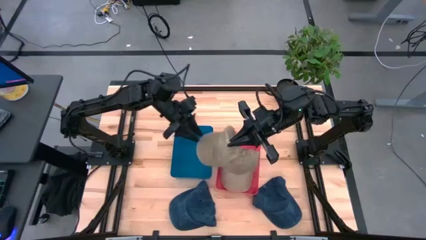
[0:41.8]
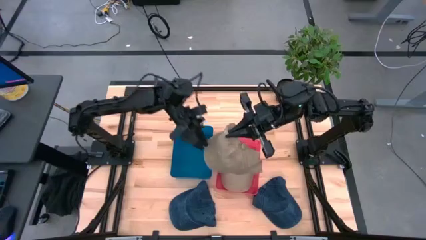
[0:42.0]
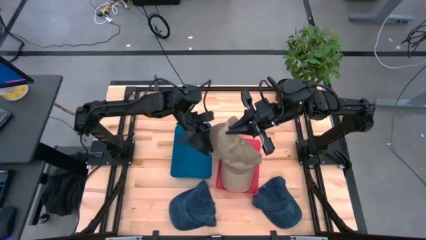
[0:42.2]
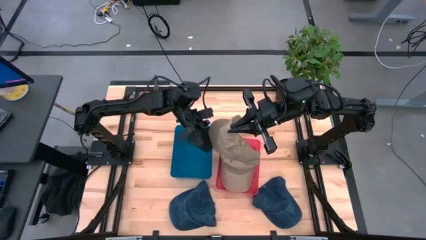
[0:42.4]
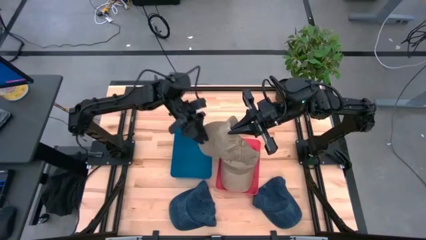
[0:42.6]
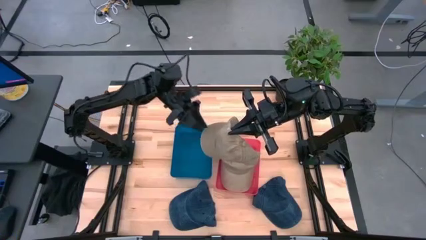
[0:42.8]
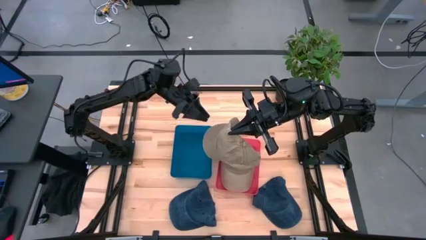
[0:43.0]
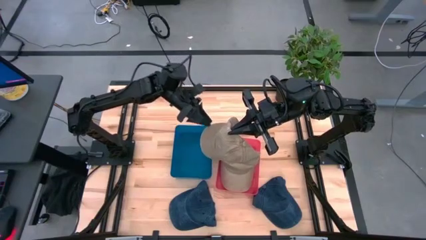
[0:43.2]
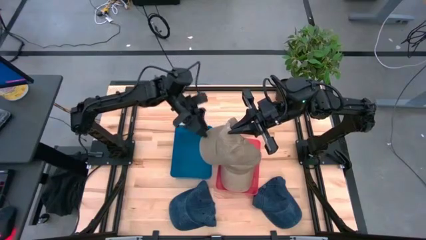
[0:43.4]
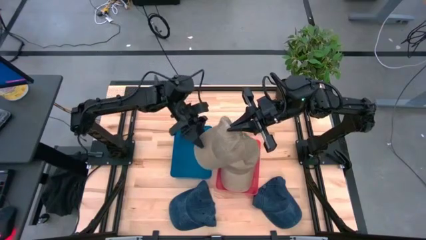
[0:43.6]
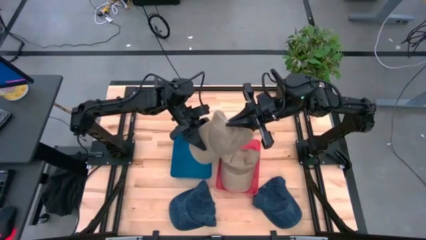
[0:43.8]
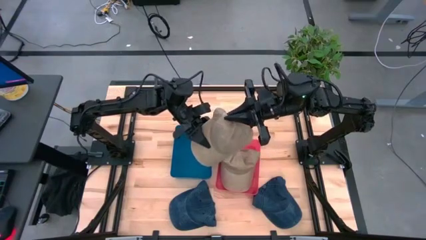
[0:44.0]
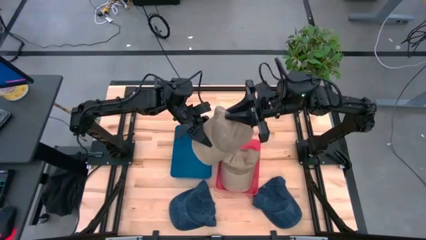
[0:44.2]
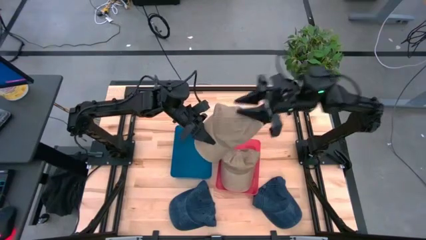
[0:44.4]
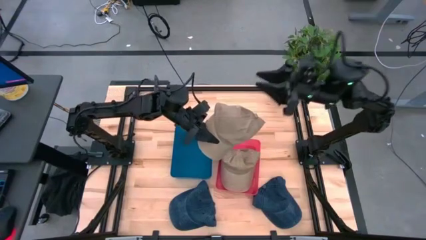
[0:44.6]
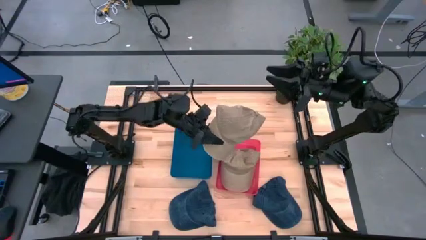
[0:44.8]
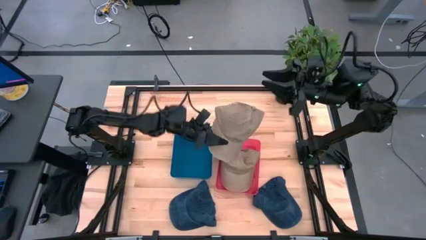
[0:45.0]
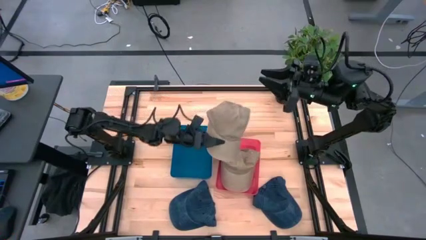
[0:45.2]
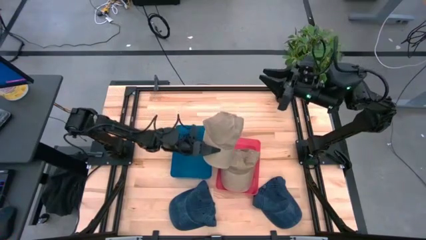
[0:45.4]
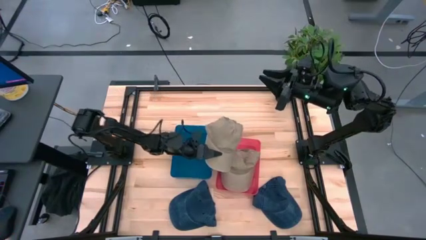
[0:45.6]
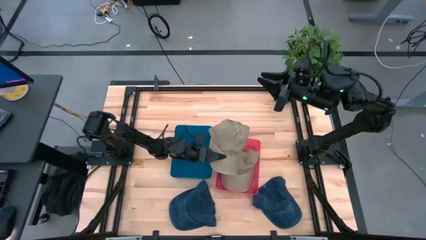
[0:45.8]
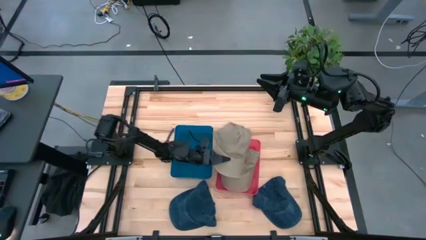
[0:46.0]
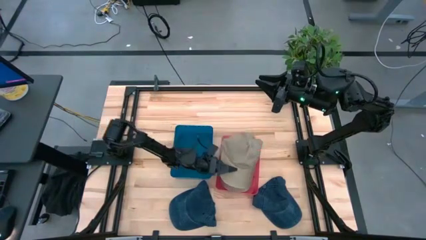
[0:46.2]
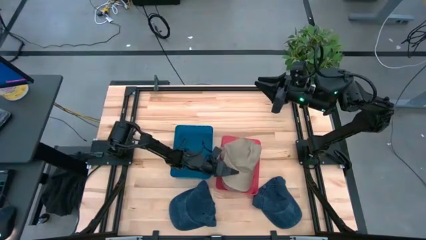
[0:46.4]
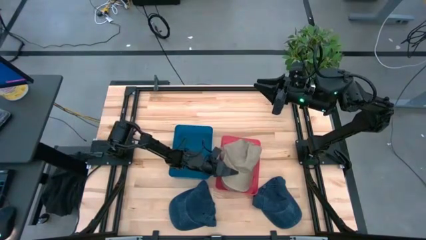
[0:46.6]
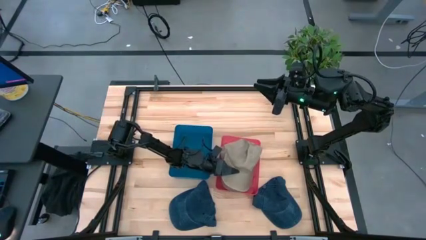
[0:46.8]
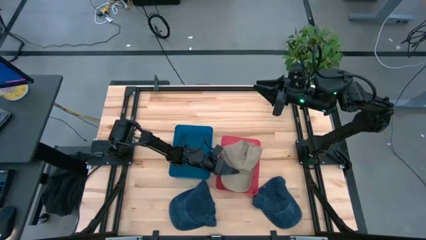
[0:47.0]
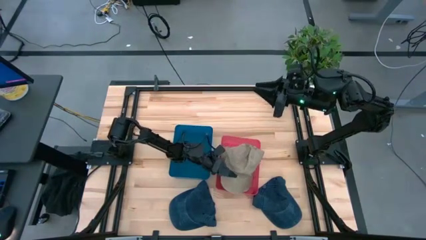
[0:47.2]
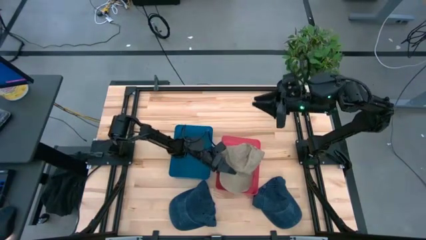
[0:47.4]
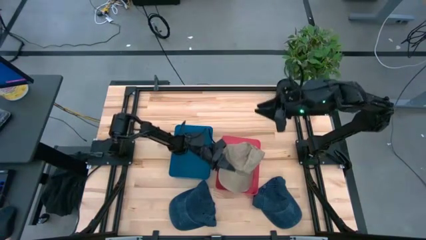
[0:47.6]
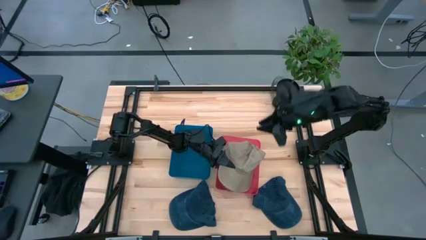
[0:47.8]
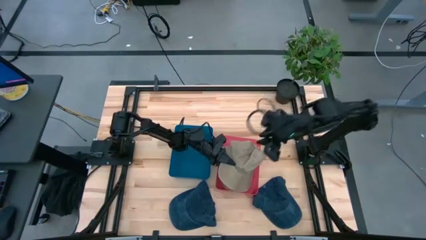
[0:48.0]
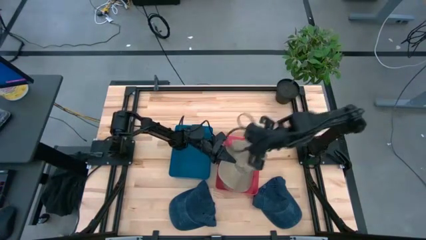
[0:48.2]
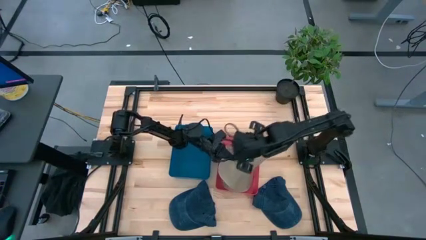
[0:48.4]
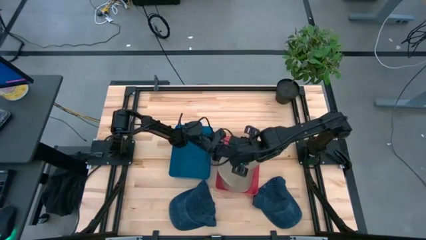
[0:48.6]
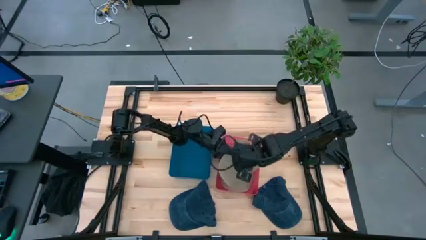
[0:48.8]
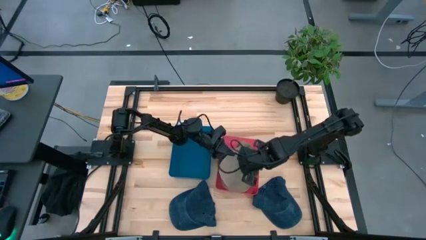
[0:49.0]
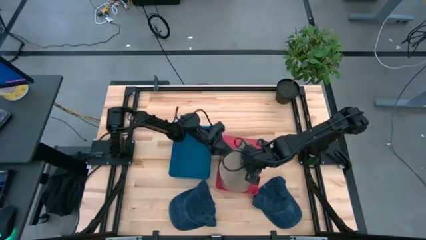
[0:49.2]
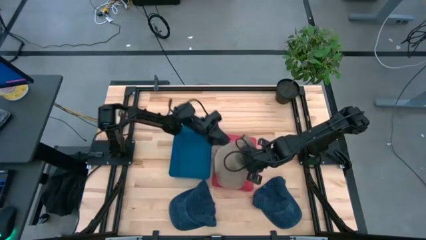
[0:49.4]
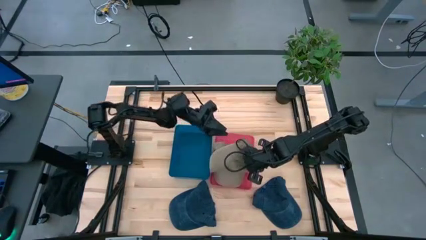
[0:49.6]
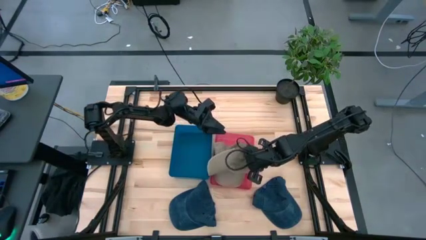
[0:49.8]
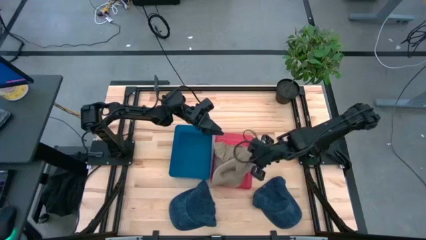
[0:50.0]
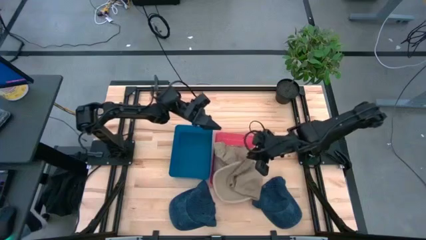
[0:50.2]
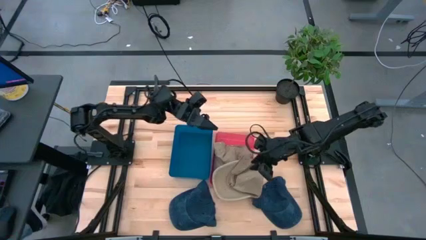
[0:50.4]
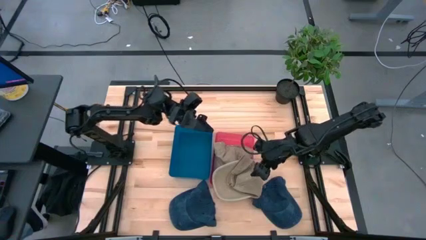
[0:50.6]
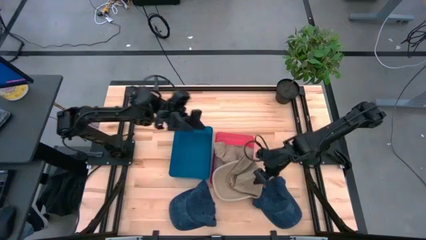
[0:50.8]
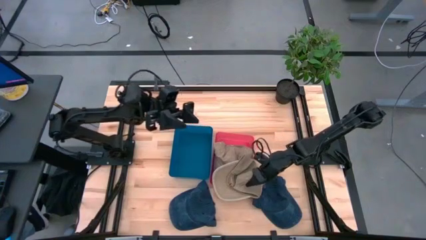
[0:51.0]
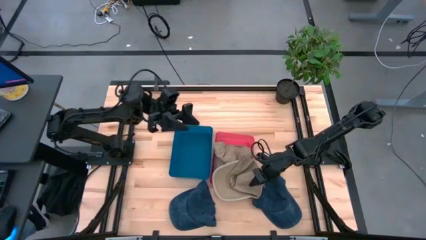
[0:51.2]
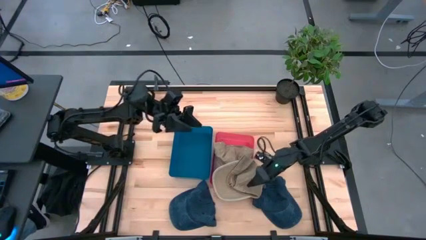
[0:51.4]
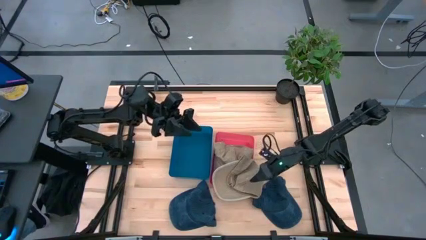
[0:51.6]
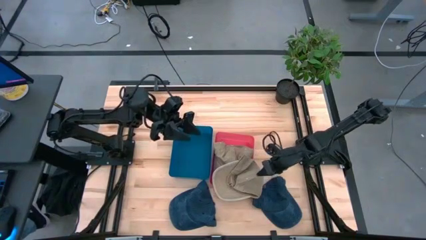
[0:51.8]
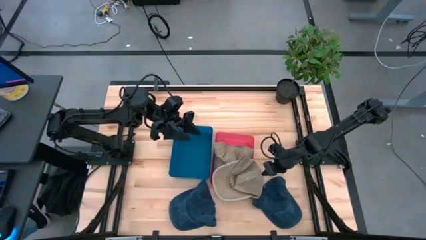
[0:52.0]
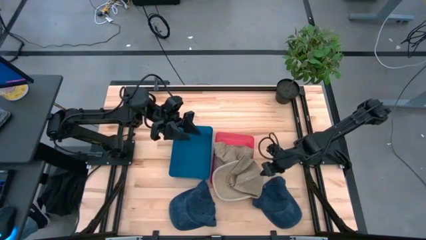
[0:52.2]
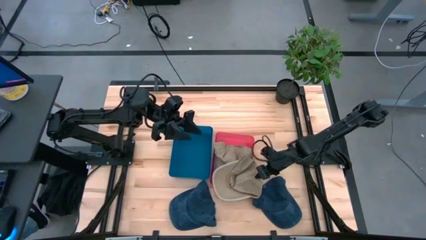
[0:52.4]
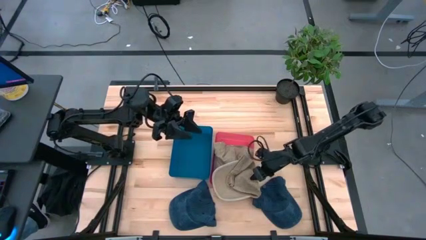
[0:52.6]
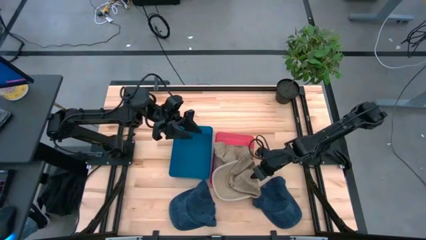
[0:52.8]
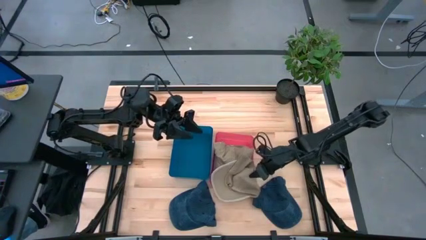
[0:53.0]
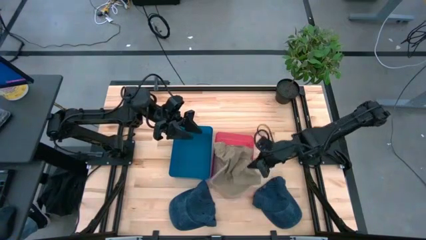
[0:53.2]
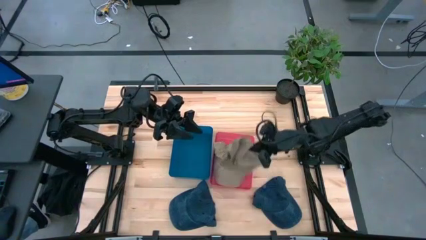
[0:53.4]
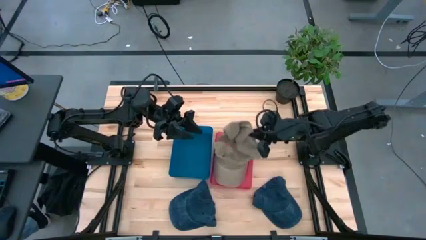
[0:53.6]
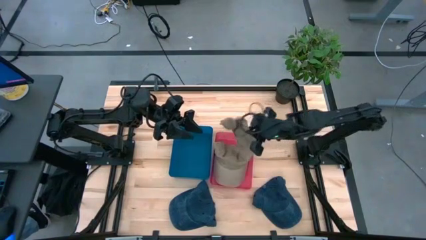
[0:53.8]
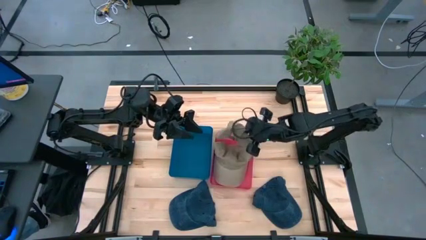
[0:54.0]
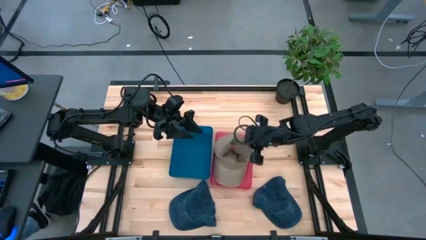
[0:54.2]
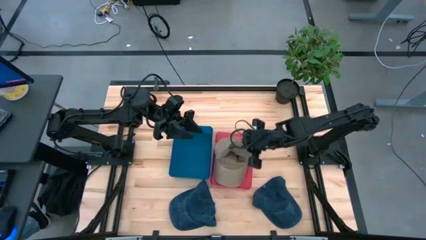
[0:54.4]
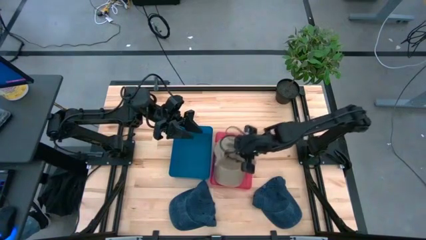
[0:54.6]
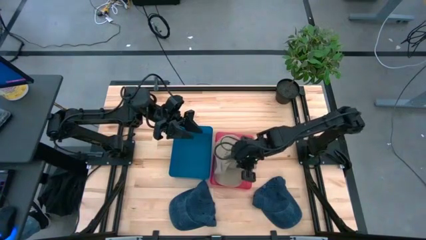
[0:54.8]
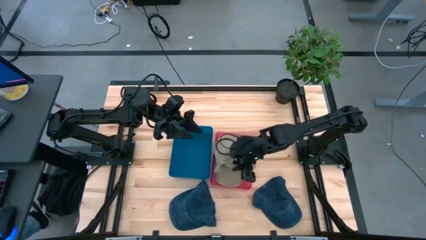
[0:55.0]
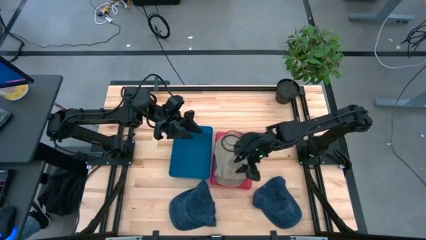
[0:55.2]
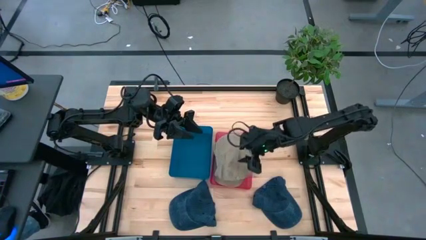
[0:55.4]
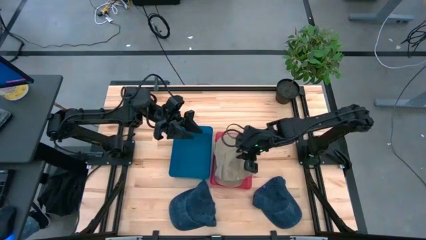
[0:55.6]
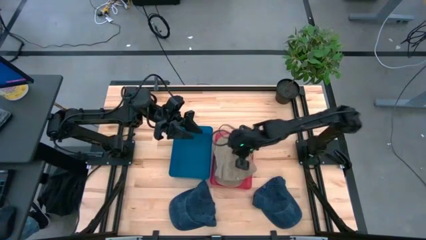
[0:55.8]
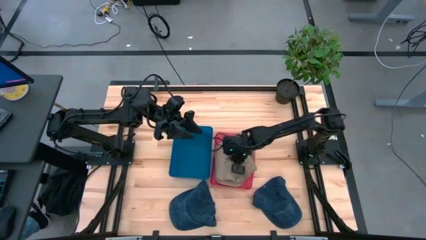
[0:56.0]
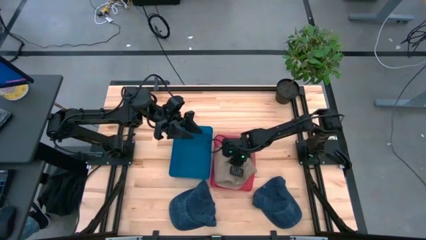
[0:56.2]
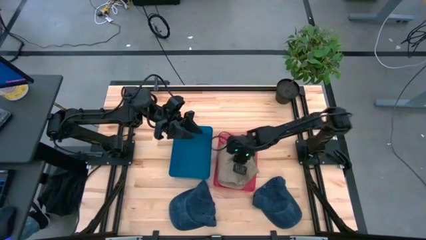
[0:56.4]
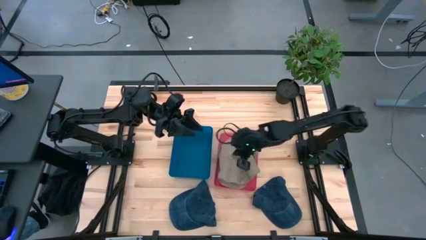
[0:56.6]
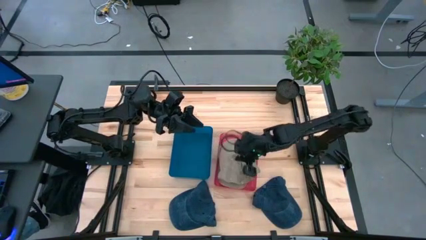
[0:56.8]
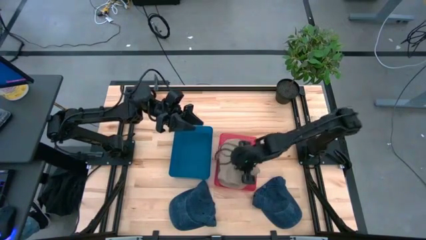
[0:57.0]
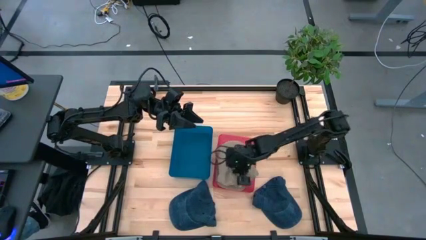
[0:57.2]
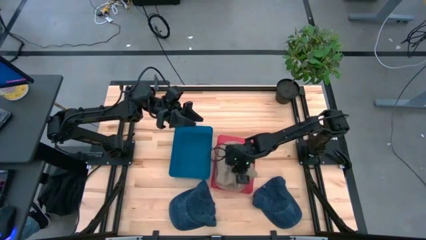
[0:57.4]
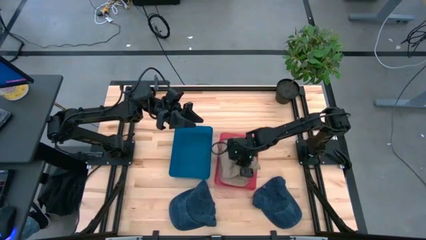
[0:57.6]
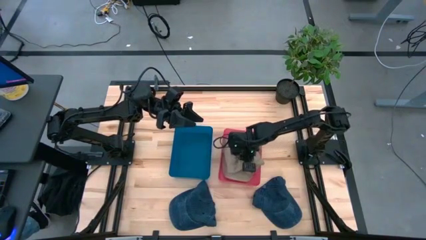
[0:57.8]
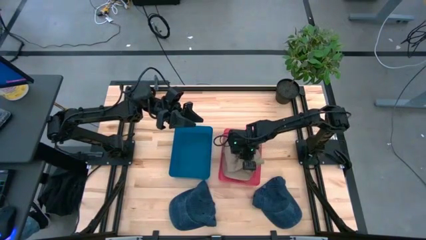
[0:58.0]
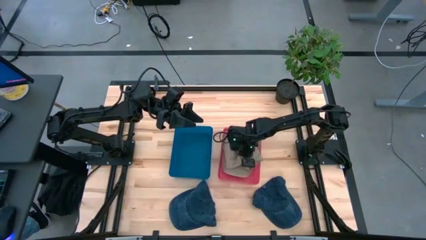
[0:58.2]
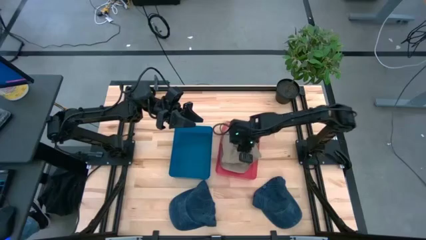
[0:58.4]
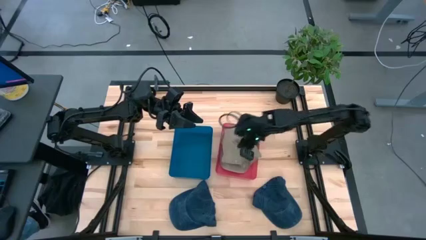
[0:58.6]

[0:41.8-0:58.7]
Task: Pick & Place hat
Put the brown cap into the red bin
